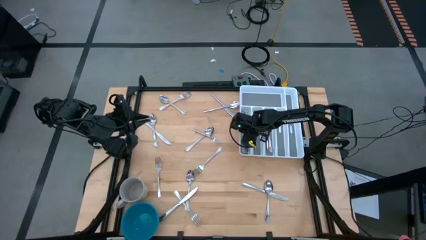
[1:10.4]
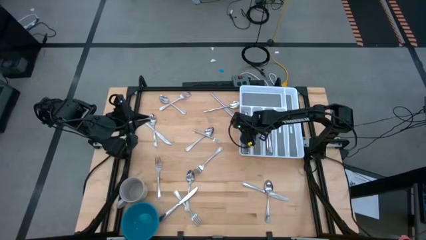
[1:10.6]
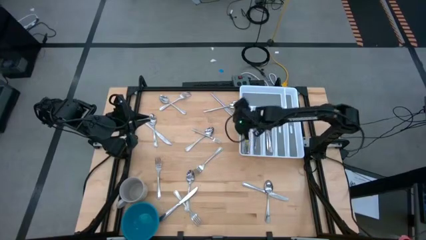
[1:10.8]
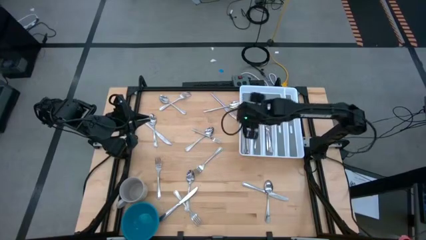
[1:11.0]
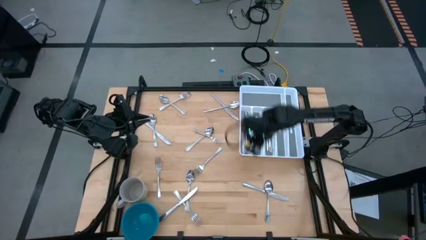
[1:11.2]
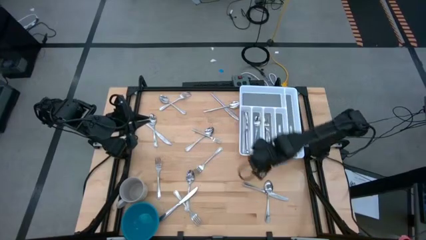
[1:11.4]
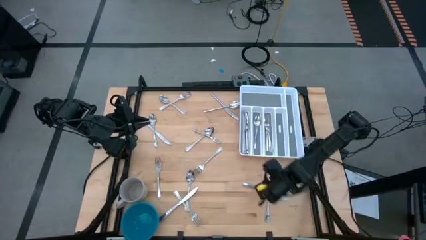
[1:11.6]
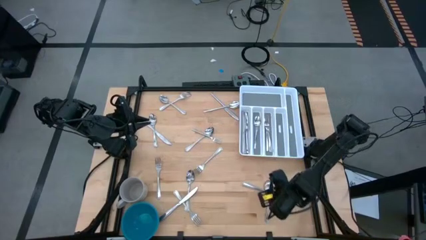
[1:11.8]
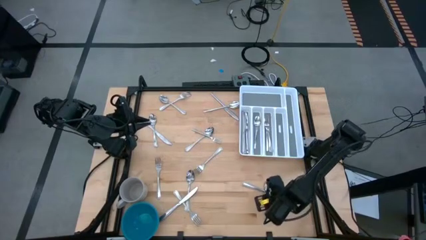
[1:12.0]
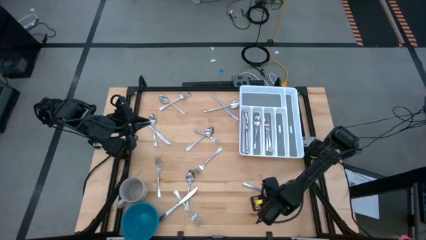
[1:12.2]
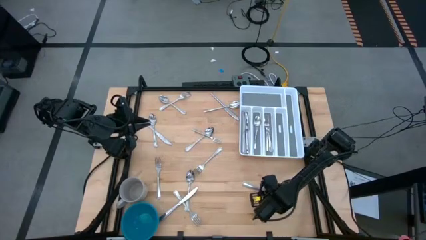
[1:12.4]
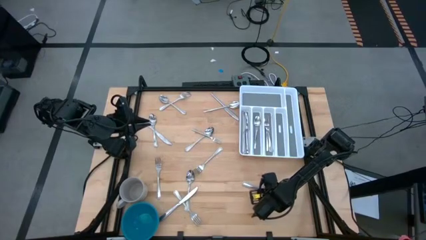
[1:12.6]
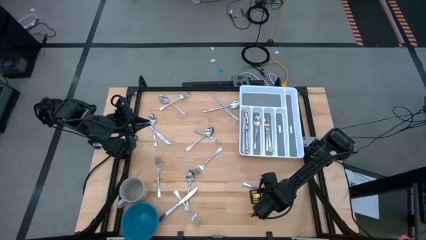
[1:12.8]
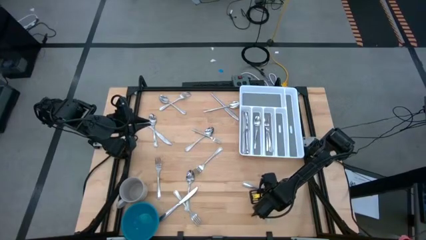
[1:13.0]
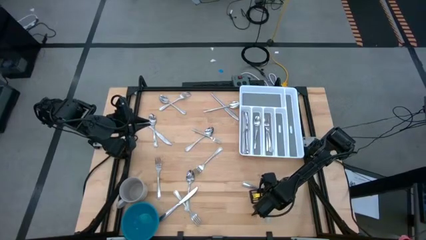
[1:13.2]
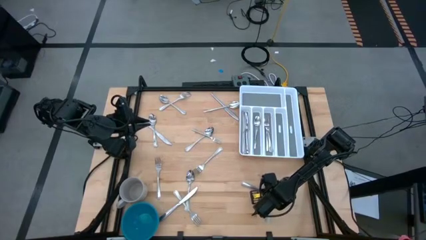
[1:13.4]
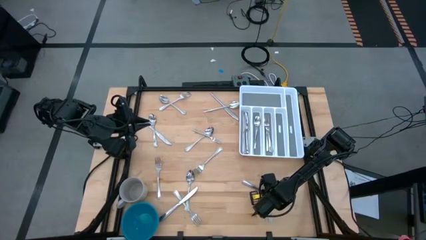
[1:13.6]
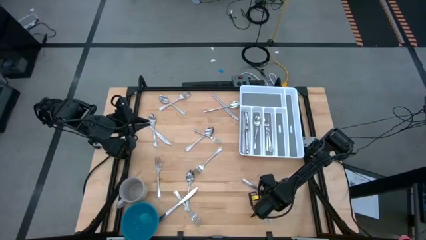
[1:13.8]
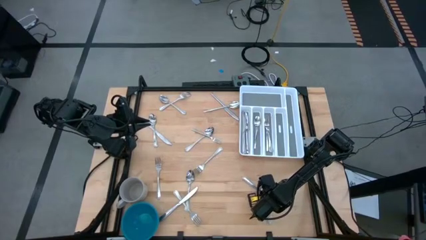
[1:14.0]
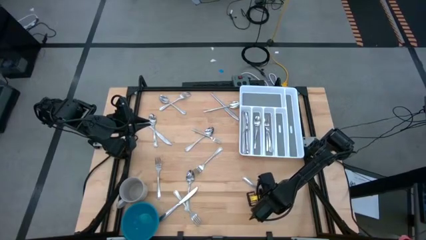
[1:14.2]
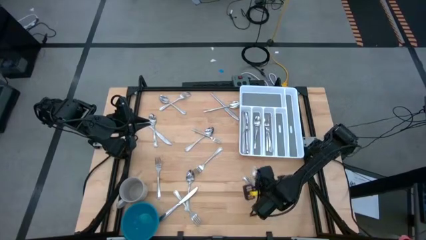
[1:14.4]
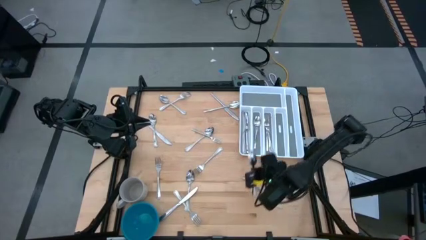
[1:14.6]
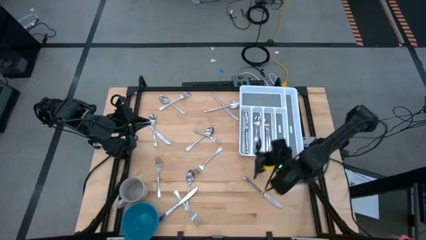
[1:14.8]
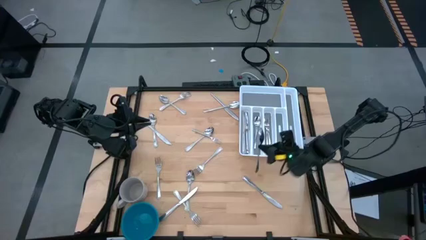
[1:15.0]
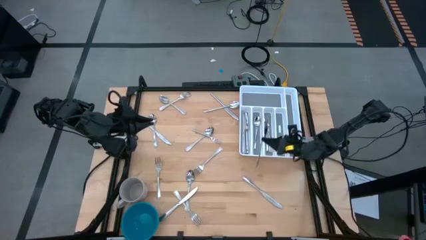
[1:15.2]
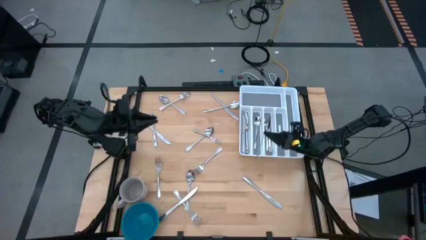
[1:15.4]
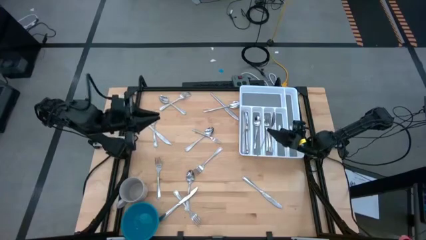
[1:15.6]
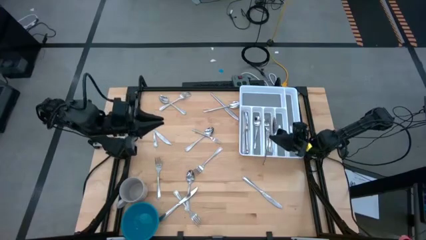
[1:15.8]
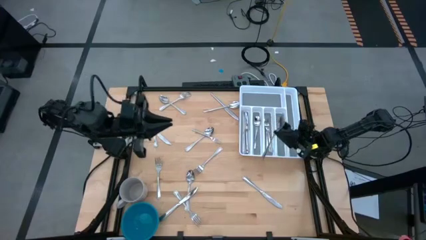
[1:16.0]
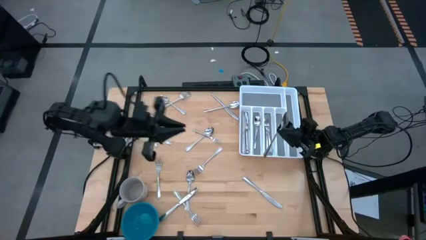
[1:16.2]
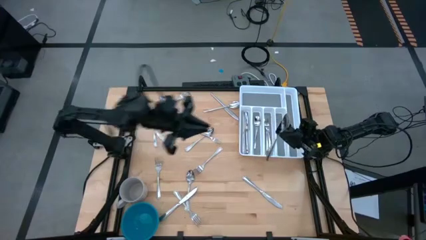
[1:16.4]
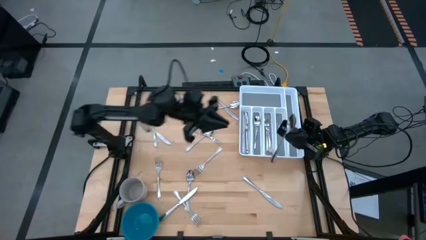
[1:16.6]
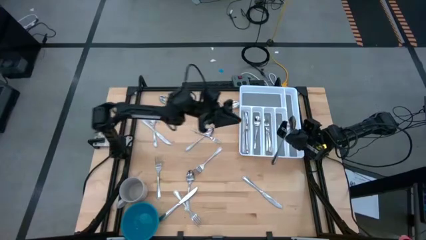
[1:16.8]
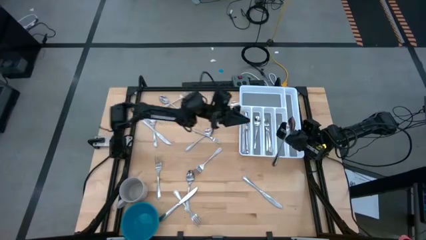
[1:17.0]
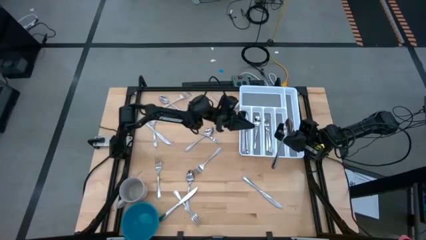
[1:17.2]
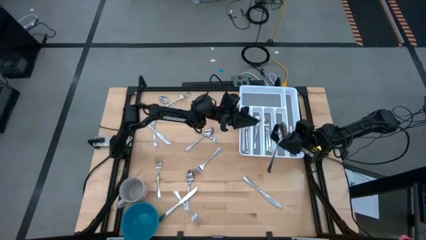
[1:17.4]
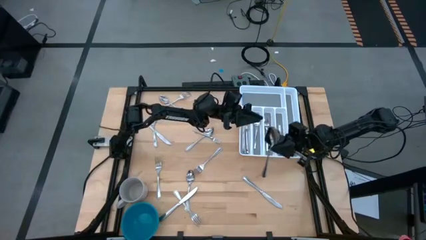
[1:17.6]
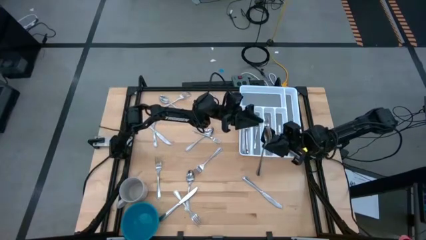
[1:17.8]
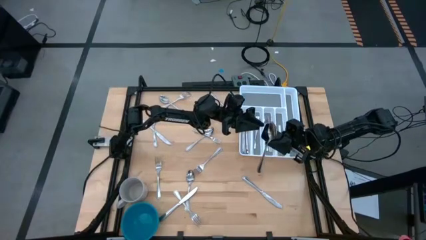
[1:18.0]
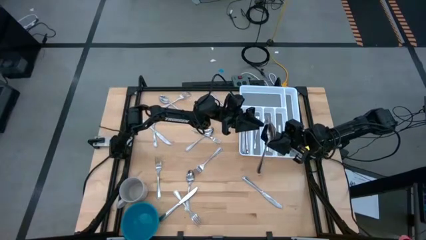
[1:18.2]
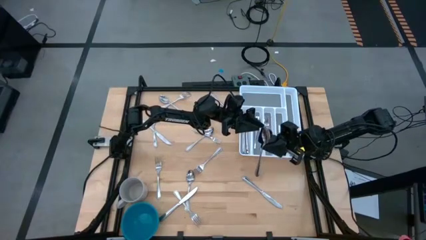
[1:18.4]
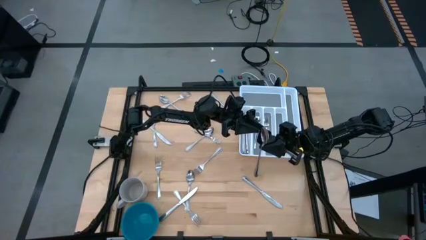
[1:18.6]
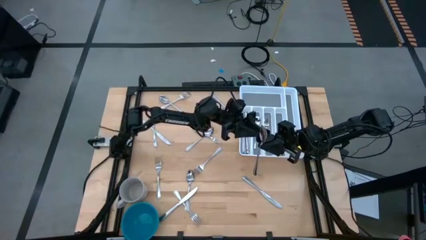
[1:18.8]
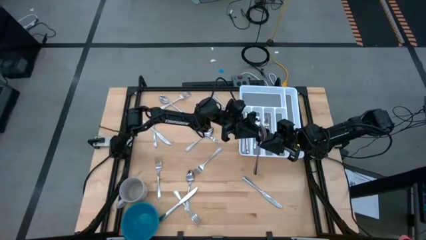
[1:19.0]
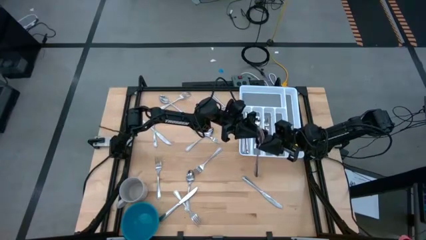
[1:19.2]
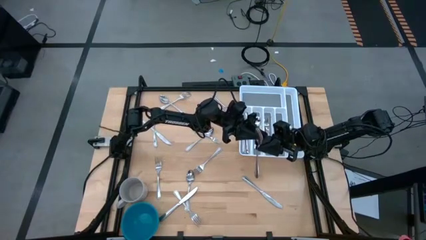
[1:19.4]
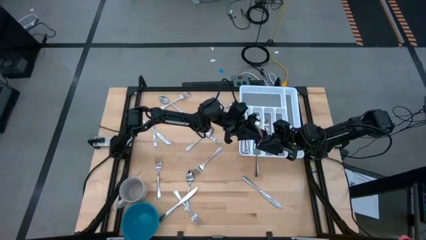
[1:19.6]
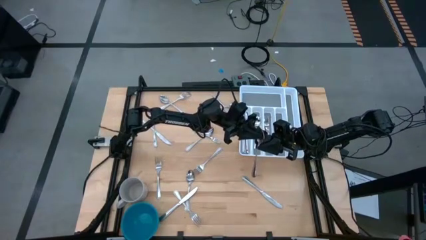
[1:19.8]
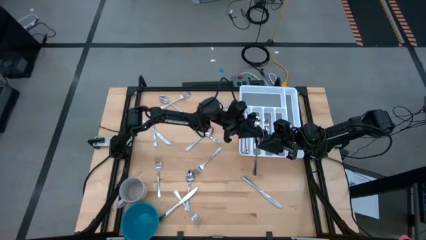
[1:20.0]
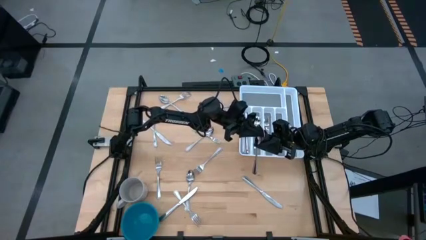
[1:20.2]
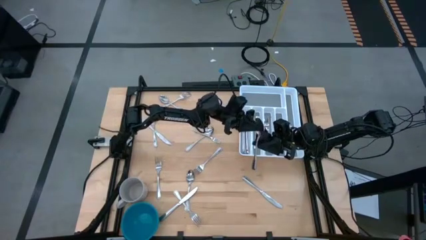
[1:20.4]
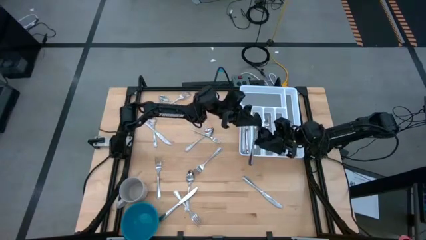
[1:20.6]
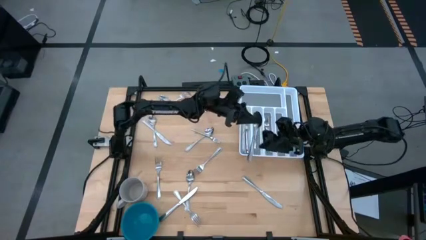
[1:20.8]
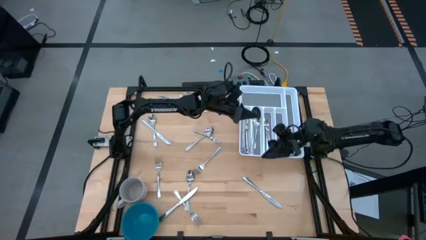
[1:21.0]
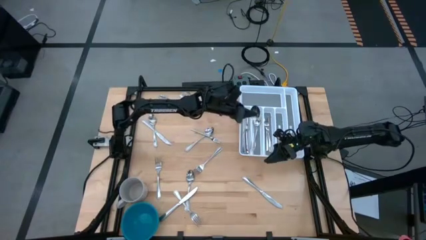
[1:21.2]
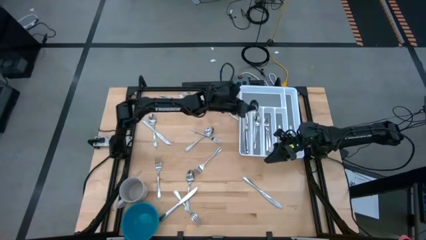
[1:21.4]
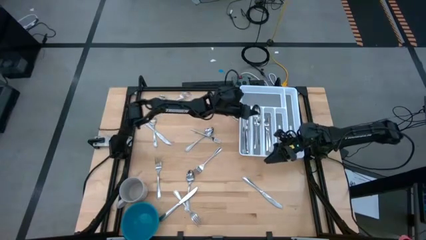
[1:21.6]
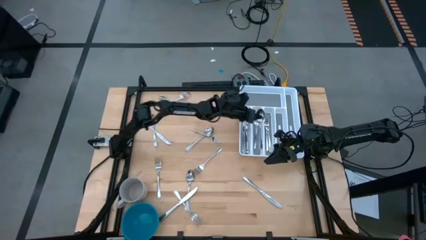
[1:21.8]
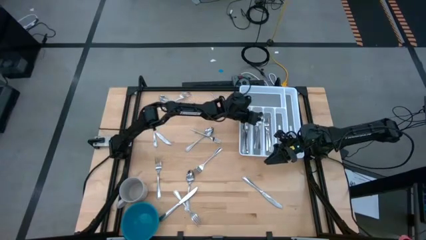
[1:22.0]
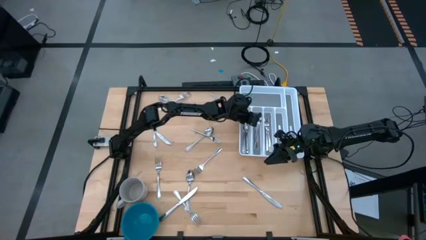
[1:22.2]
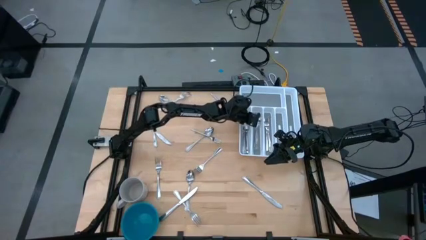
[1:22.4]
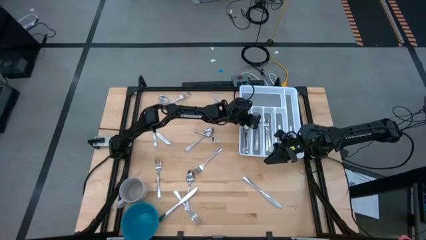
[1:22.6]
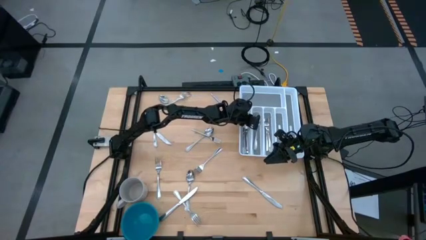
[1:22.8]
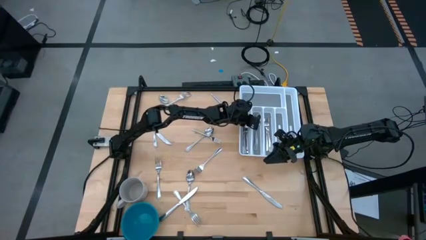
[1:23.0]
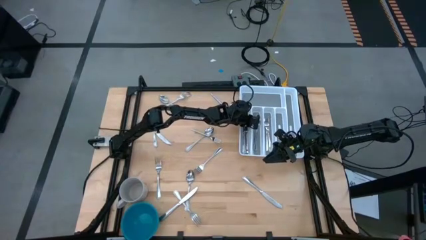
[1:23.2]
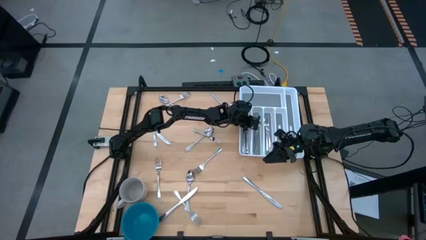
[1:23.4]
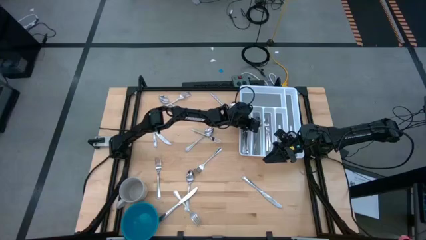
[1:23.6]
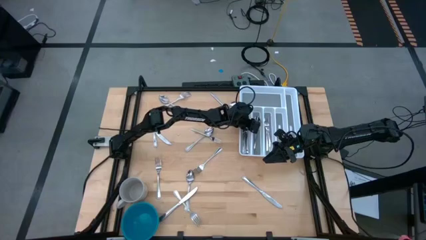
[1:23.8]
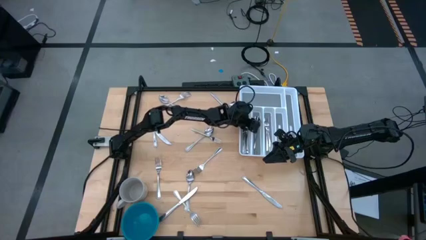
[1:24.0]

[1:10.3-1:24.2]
Task: Sort silverware
Put the spoon into the silverware tray
